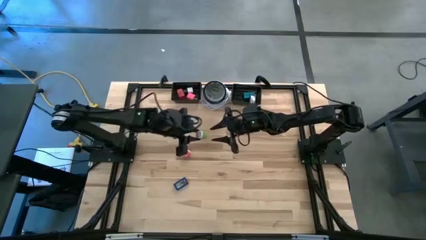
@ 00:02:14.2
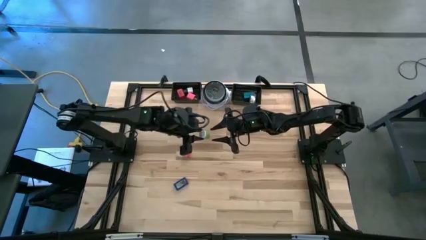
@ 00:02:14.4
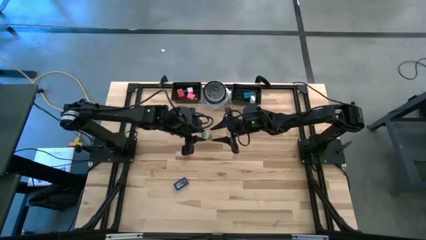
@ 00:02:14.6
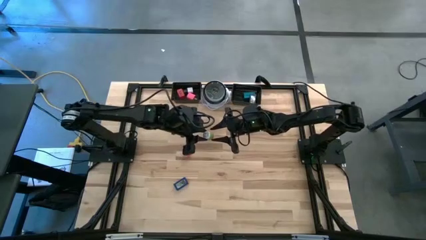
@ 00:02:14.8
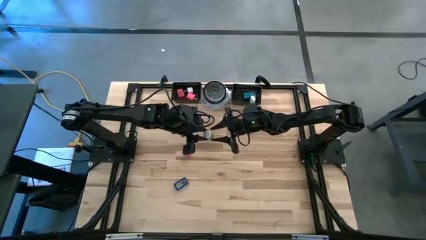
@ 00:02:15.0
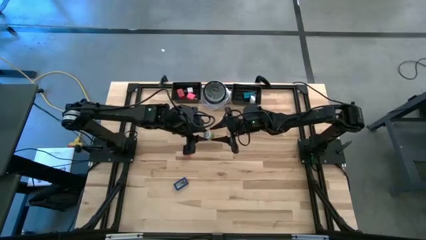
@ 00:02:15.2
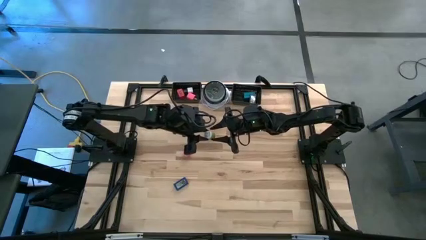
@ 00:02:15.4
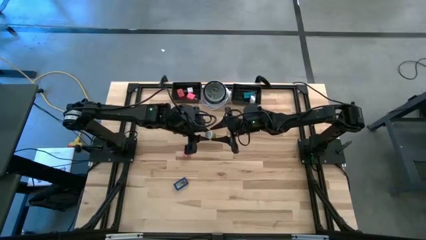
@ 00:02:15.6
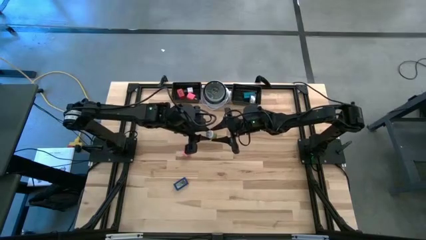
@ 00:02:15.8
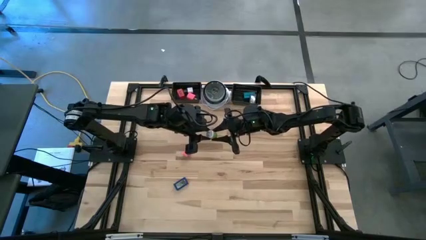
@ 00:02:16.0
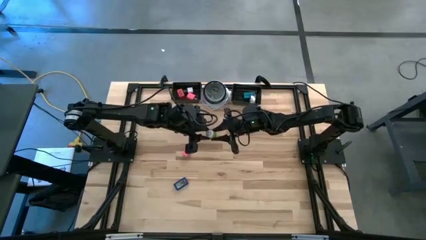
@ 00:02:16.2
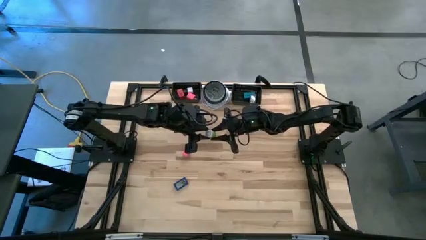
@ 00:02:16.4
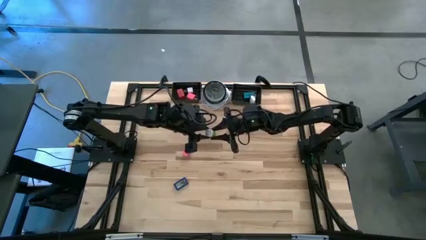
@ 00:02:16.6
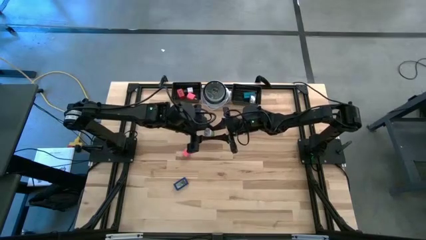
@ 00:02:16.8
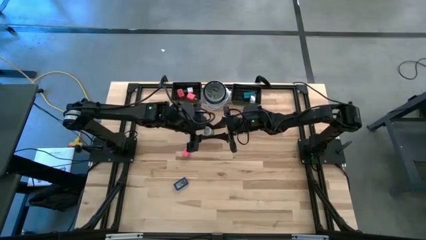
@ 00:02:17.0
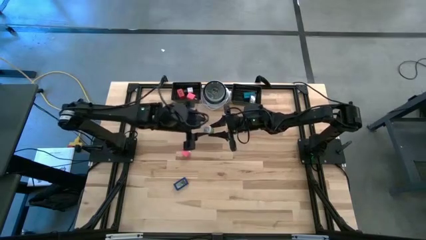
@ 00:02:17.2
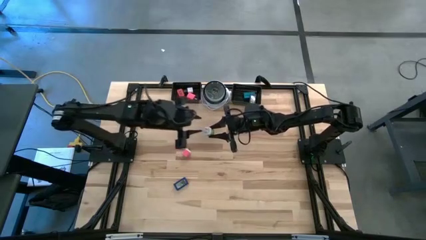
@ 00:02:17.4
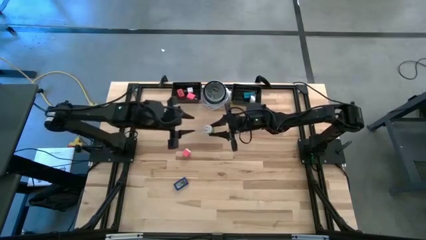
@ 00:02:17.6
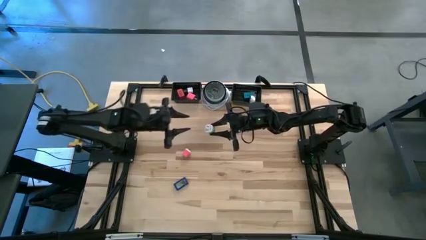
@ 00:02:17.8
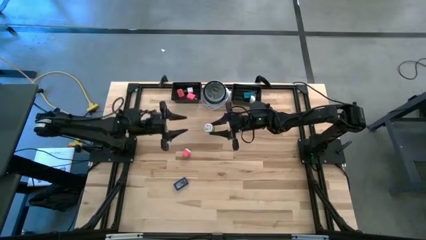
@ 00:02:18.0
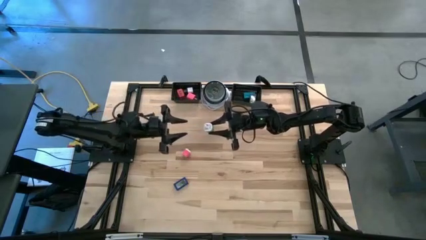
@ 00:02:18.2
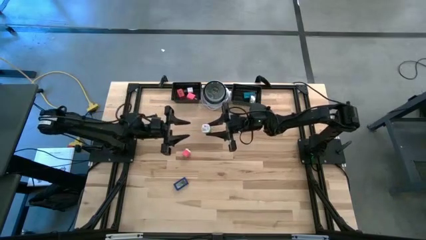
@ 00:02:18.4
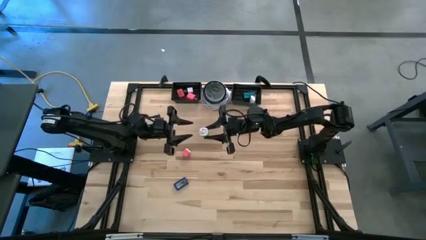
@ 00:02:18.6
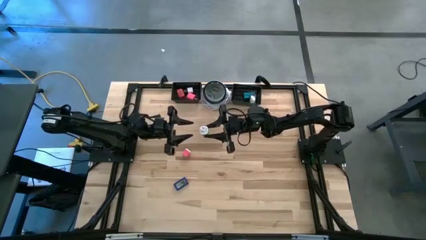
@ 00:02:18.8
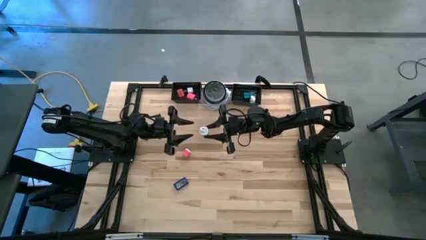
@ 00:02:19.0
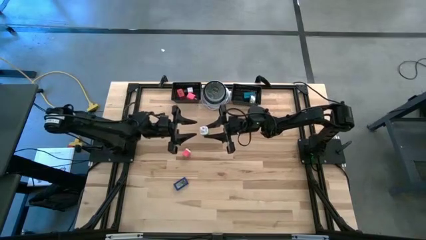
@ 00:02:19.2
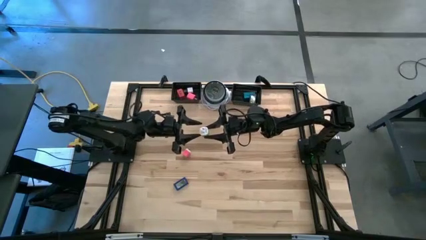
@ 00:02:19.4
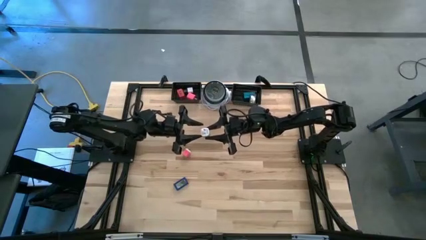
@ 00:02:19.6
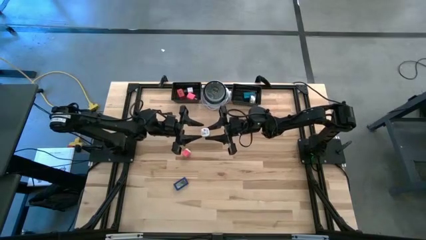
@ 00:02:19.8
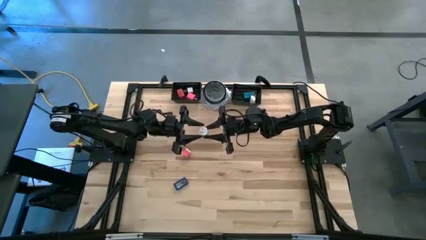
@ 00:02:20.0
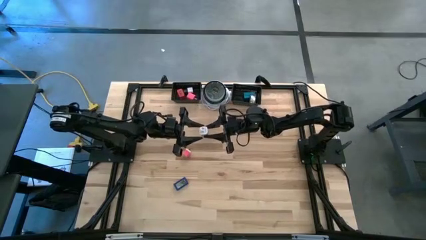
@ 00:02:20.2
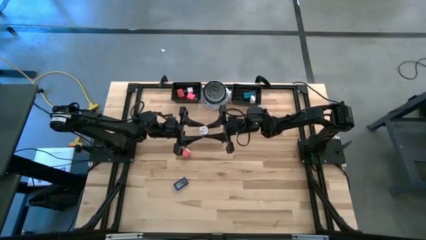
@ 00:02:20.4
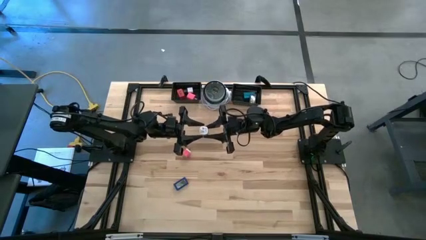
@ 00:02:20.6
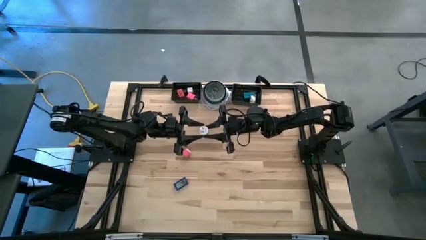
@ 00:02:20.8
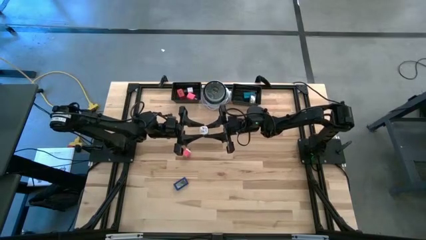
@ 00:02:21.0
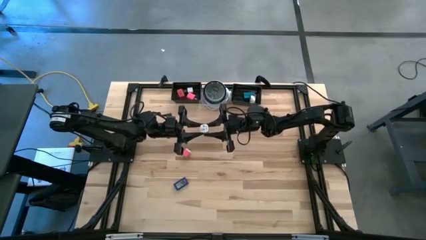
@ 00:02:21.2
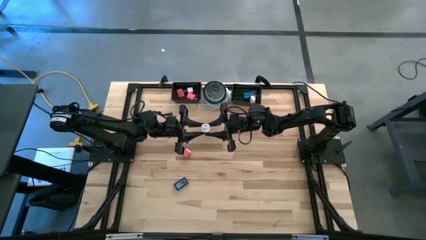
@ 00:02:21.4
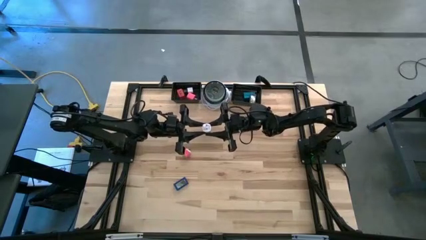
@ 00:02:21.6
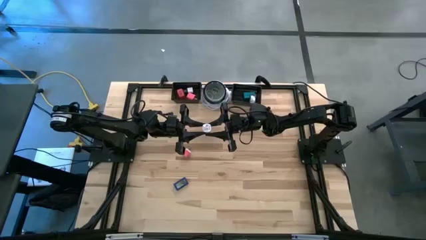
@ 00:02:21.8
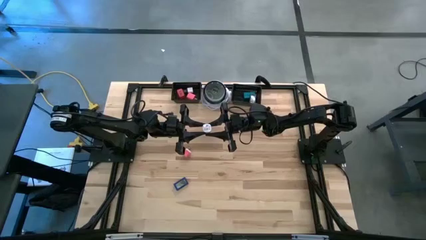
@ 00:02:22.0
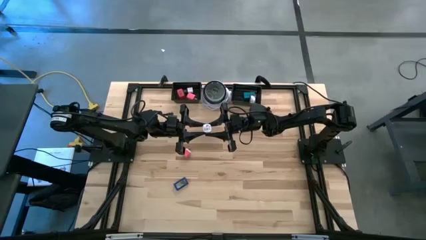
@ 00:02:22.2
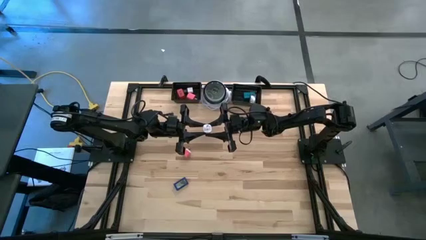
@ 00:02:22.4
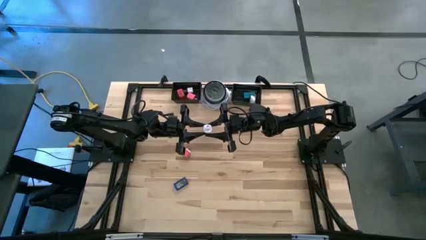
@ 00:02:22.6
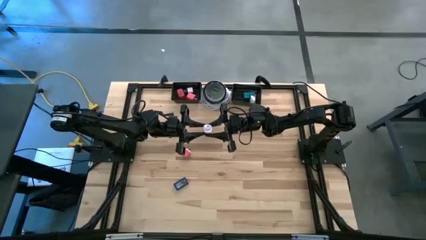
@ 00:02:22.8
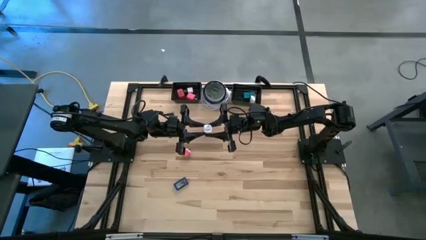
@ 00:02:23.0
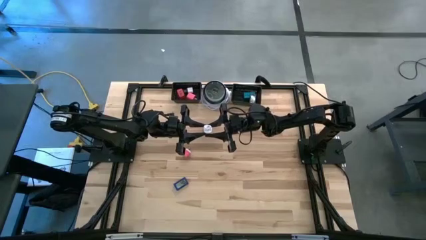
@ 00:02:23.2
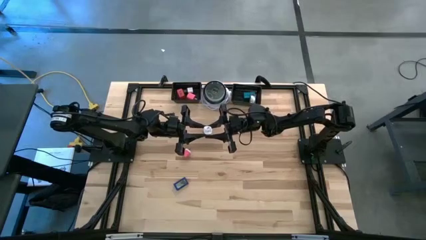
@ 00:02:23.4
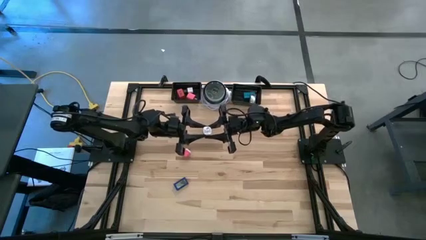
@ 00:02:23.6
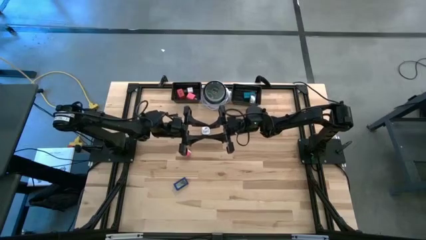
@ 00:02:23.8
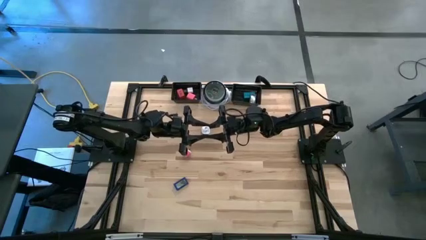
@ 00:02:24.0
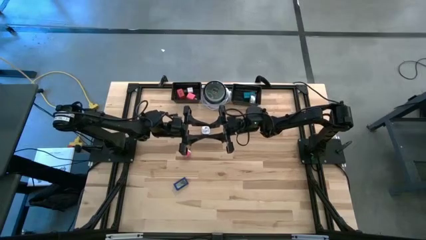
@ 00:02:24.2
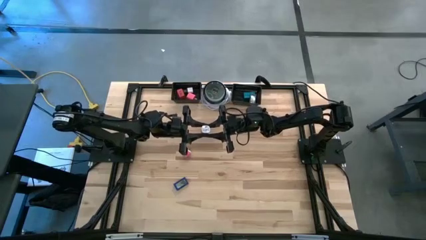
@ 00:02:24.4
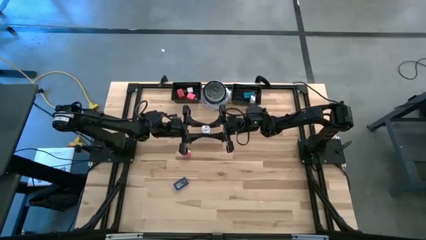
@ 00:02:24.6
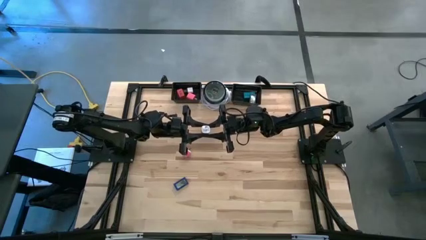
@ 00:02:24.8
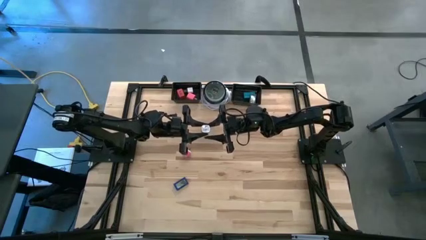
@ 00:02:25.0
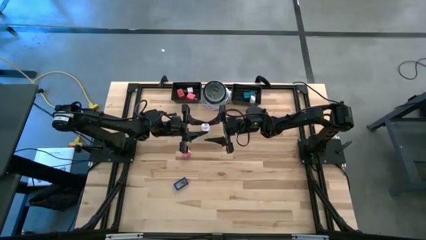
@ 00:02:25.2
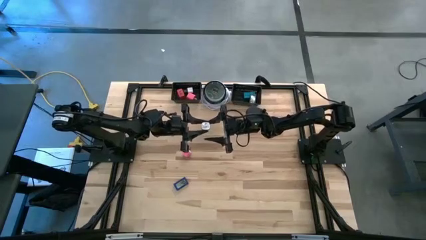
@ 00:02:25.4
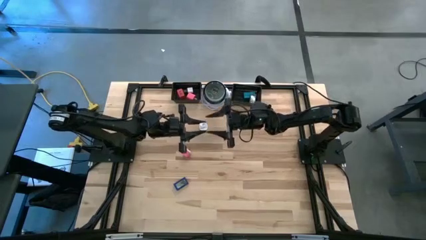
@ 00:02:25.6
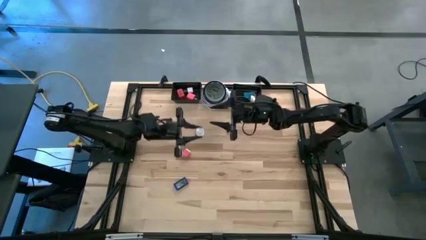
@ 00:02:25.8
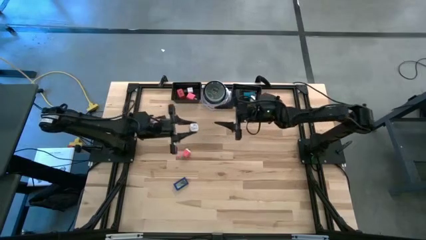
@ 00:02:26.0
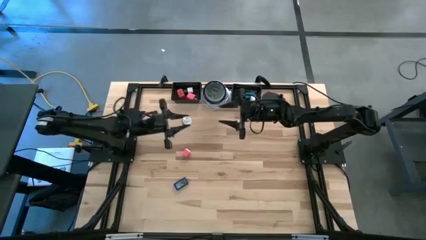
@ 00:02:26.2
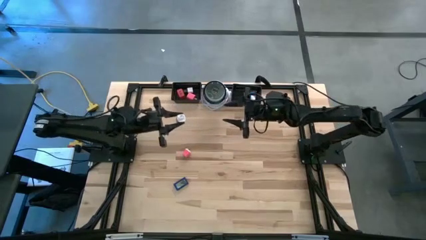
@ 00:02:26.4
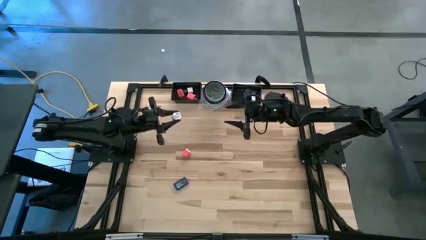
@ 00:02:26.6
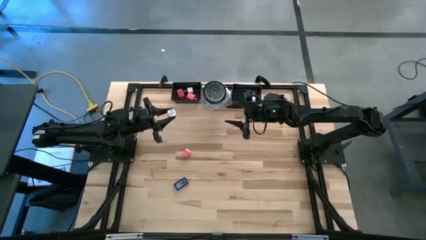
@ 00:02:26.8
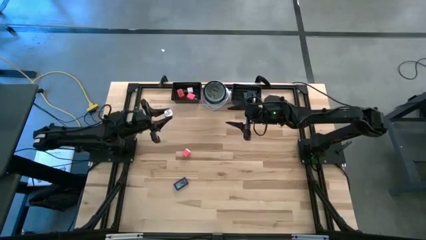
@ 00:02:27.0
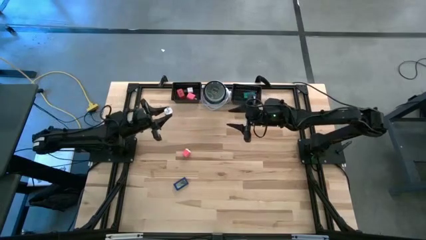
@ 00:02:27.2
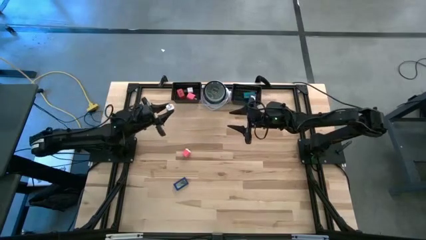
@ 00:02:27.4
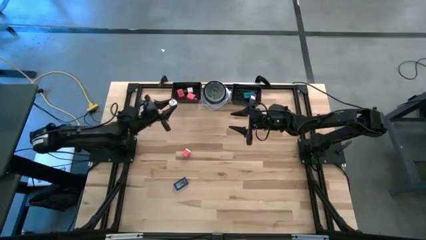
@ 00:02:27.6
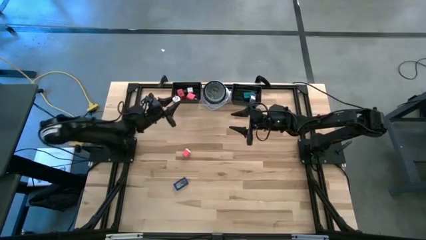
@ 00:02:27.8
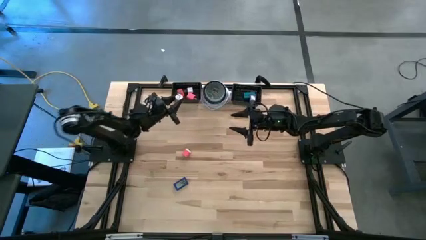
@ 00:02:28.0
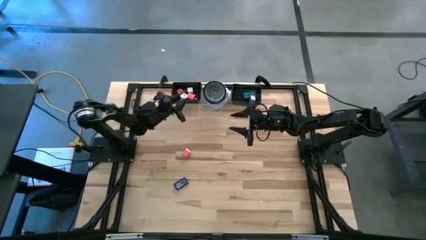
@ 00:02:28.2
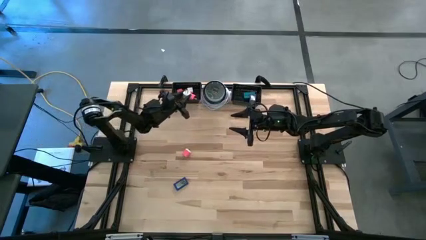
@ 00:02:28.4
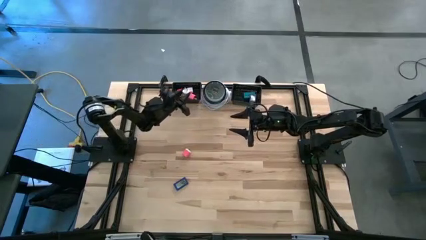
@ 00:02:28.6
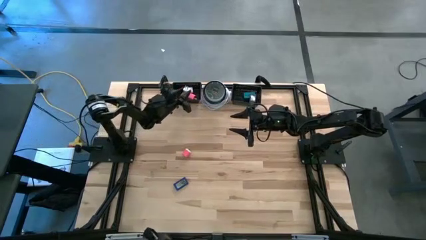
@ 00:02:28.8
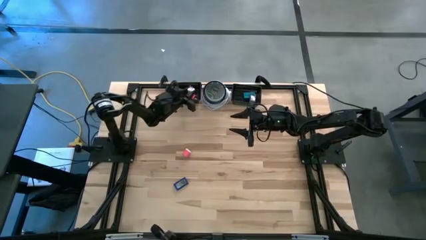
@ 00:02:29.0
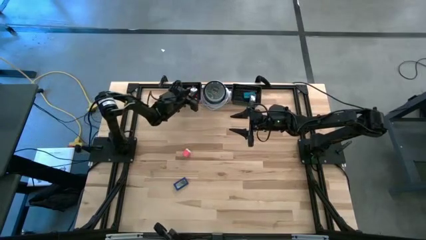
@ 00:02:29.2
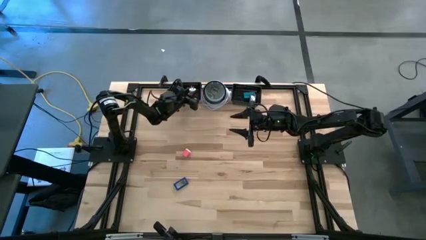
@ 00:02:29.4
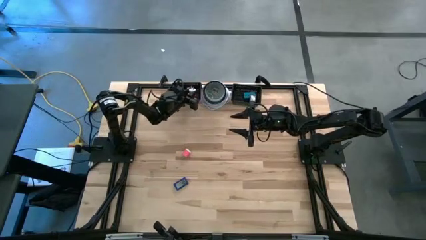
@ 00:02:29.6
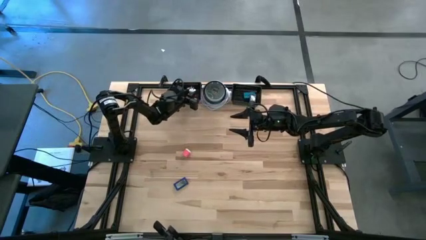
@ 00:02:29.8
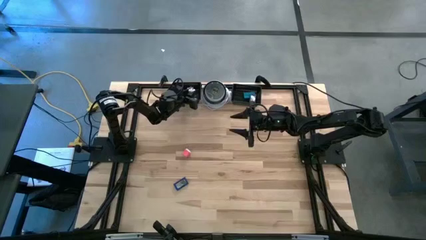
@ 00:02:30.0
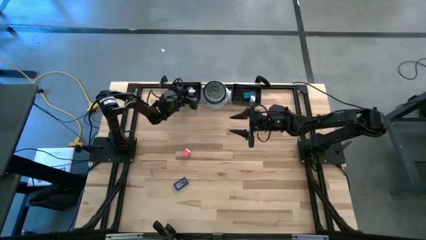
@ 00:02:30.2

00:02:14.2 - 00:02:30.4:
Task: Pick & Place Office items
Put the green charger adapter into the left black basket
